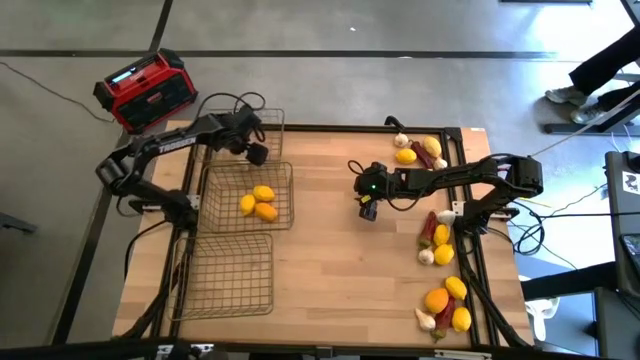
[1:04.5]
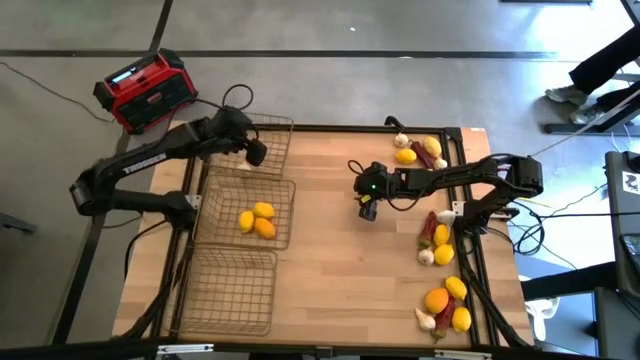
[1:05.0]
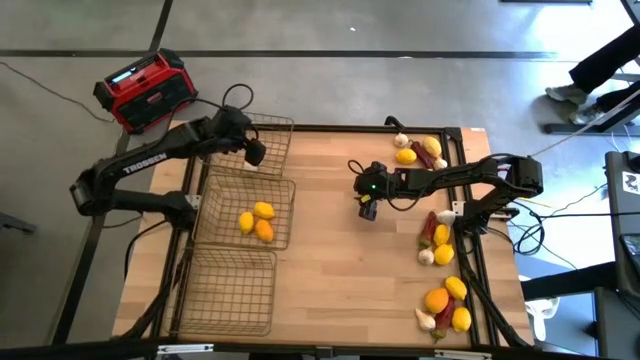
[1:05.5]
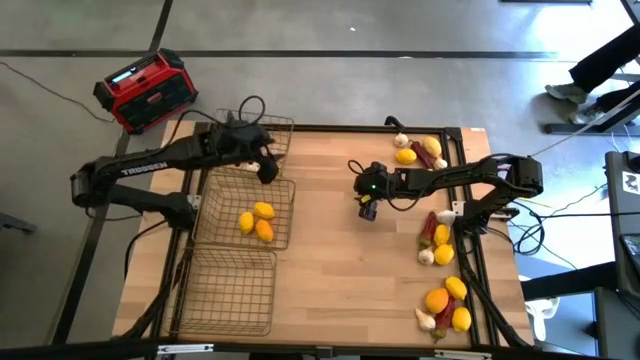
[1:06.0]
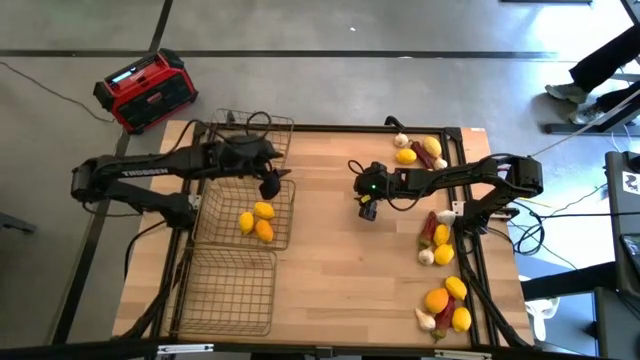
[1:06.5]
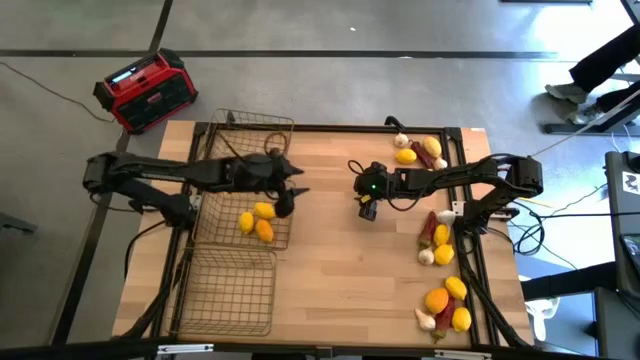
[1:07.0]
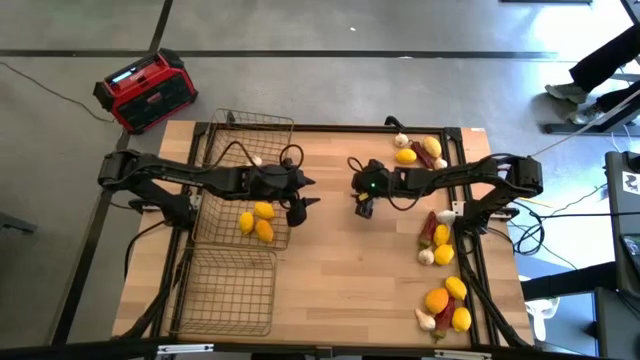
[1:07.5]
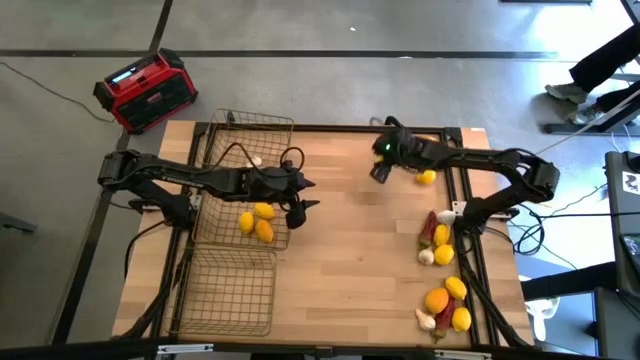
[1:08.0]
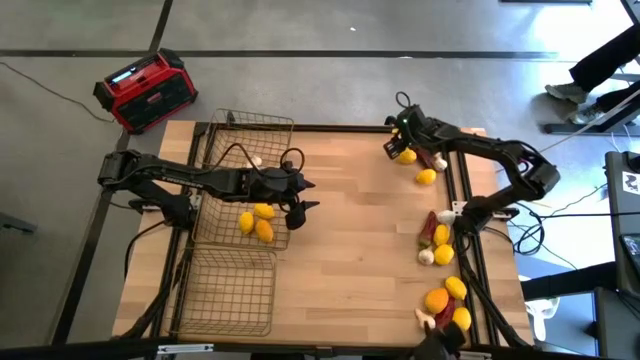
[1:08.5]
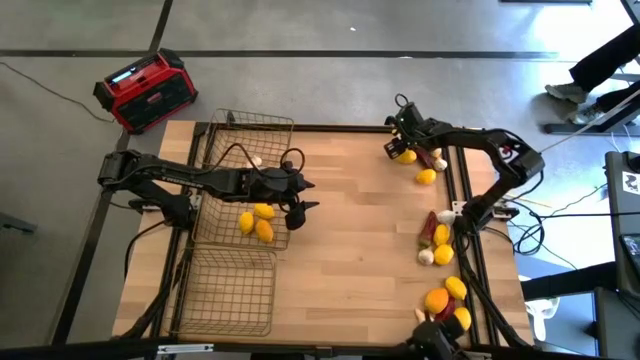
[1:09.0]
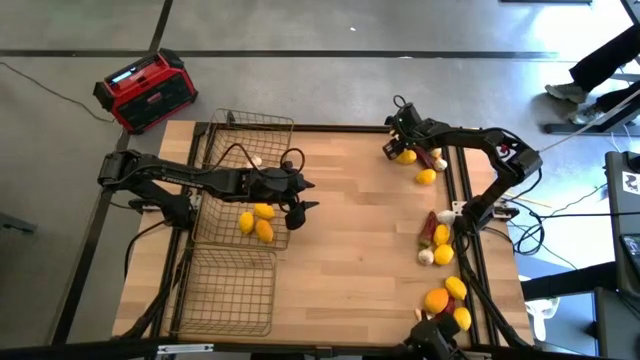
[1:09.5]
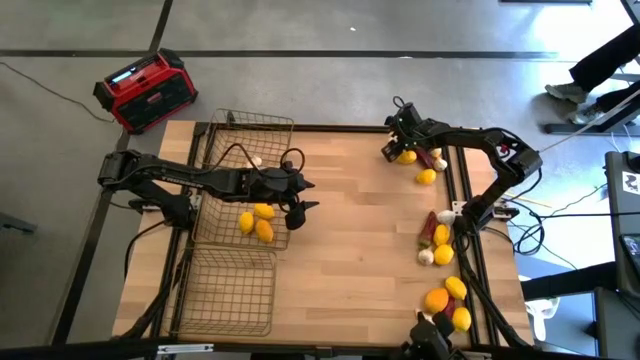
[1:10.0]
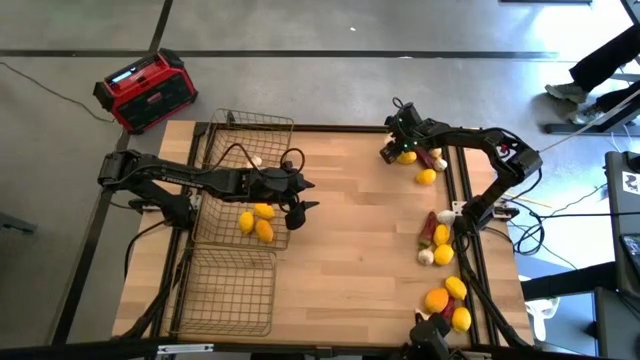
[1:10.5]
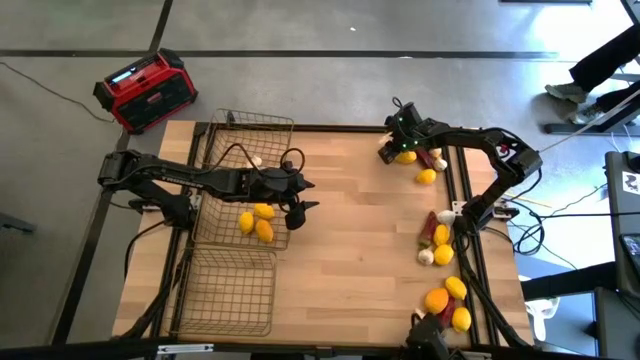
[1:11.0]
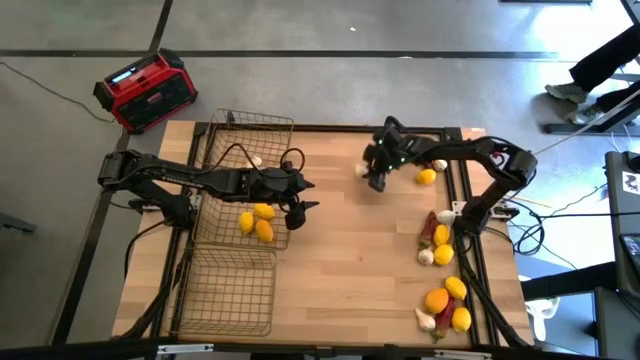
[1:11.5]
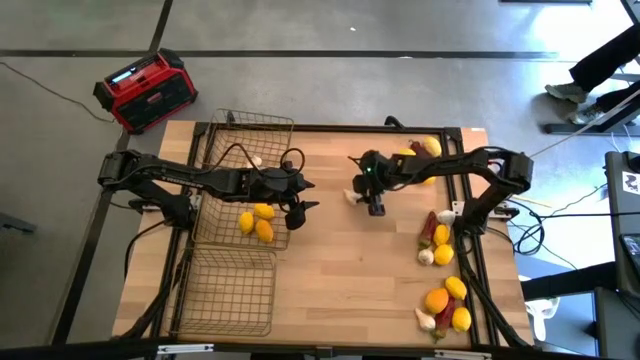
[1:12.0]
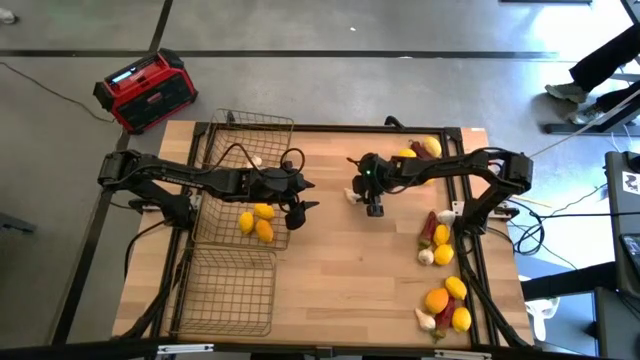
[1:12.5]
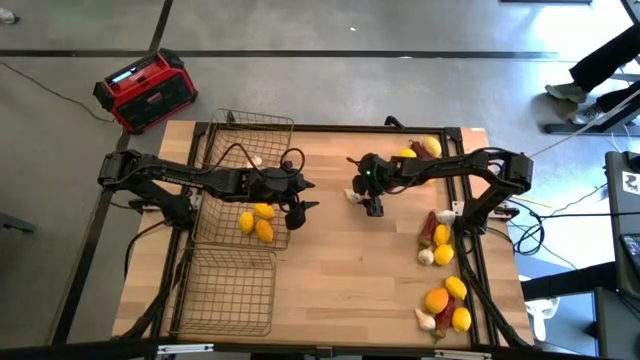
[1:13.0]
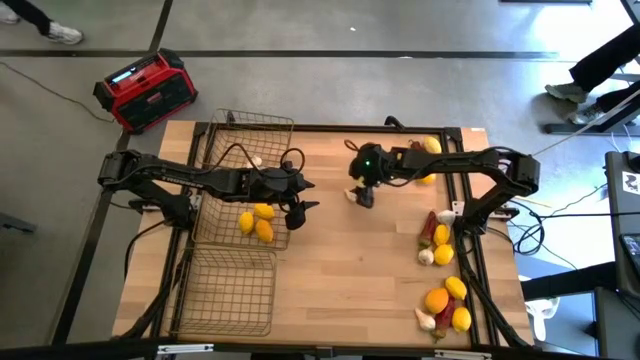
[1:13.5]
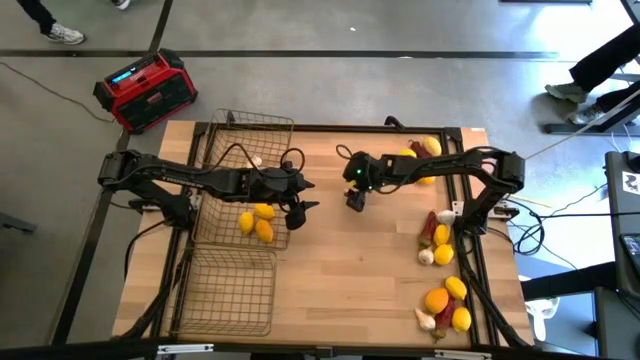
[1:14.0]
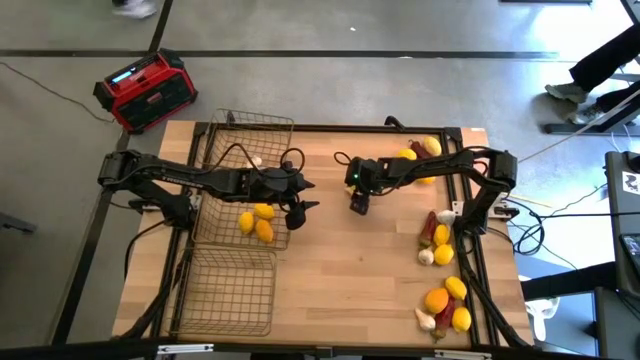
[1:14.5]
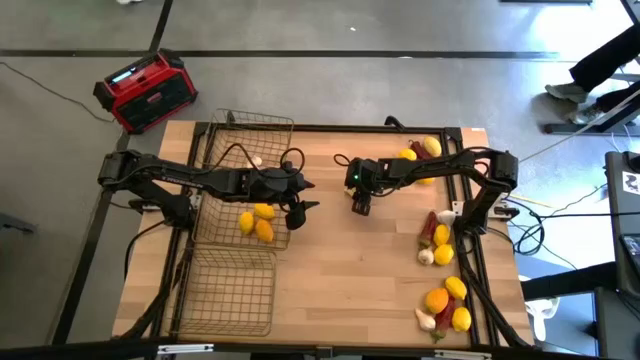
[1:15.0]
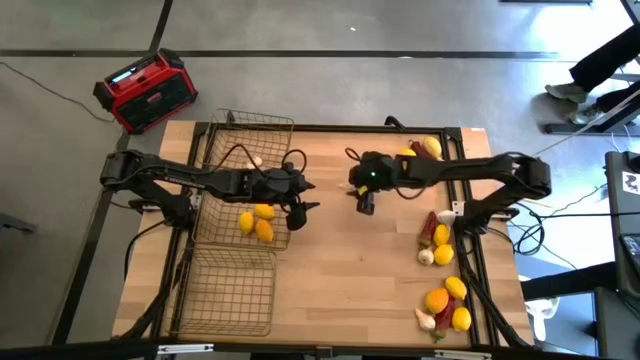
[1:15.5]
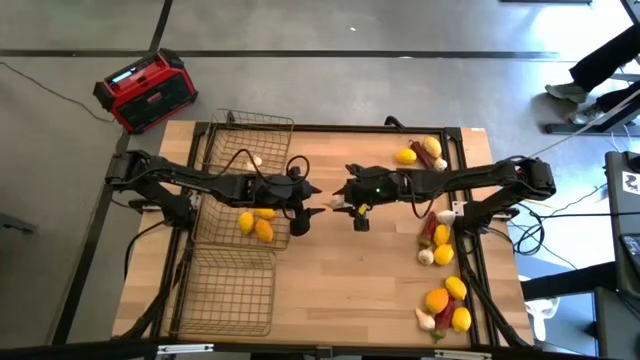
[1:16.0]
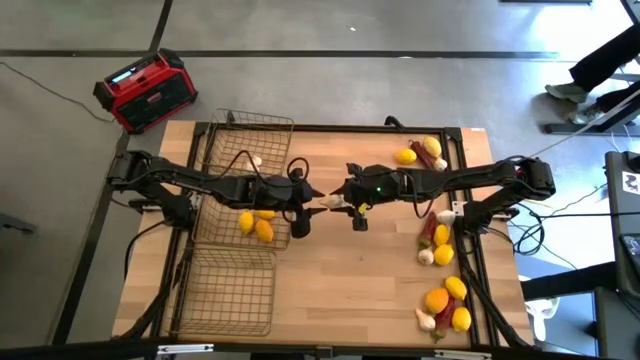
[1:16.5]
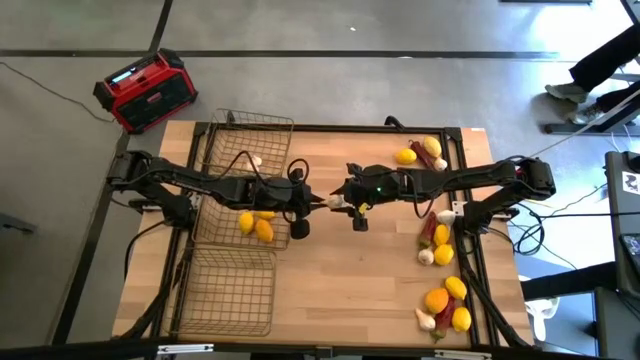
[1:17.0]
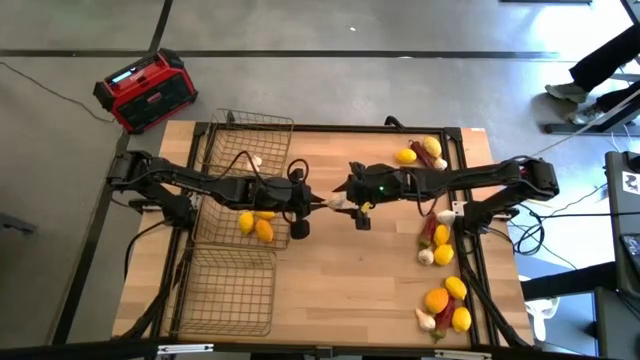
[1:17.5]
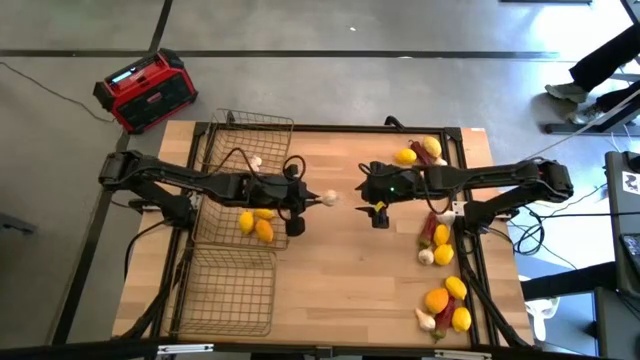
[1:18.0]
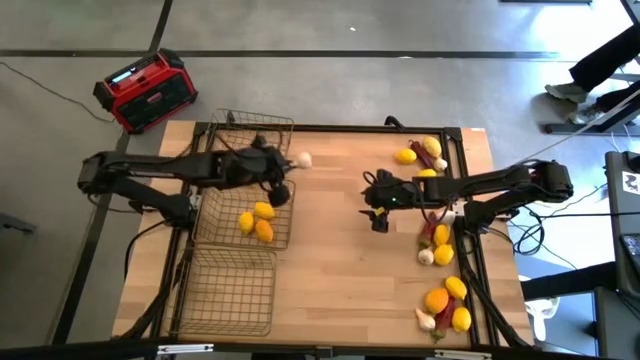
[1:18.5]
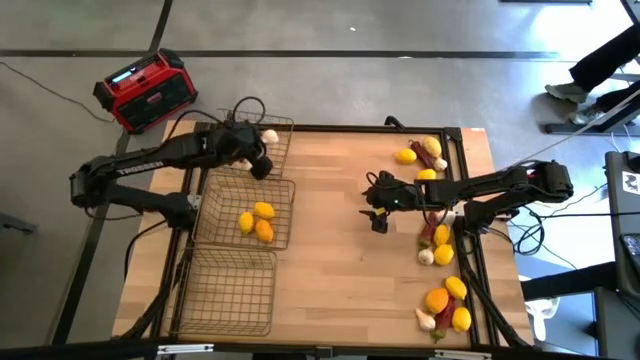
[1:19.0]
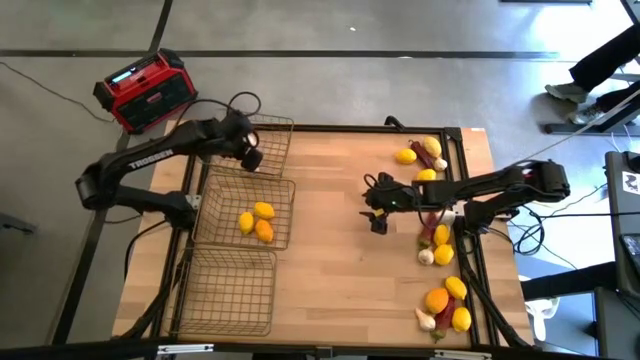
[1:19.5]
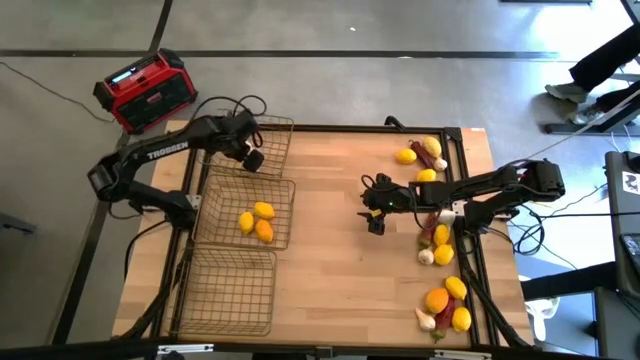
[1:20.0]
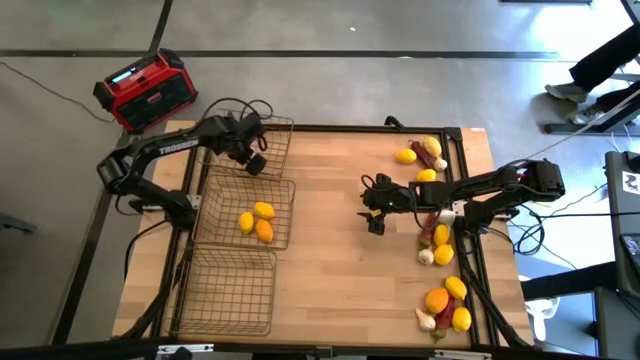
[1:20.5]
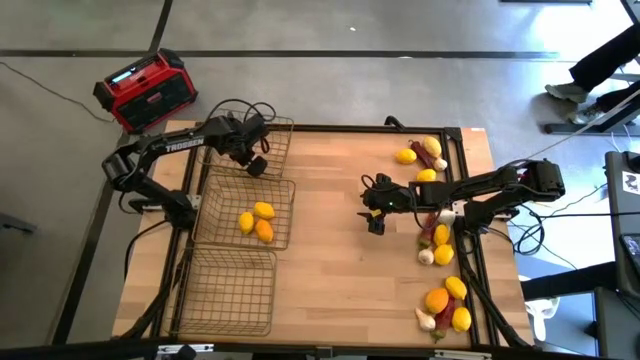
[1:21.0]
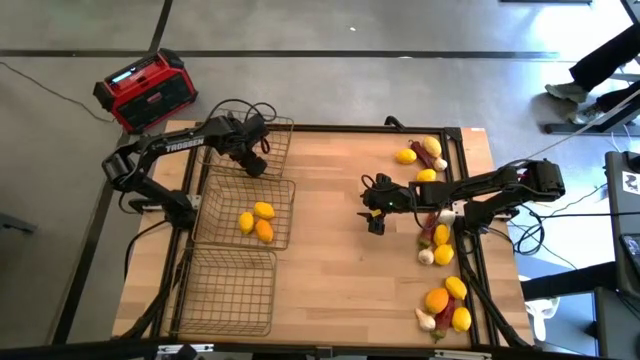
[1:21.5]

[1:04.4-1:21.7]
Task: Sort produce into baskets
Put the garlic in the top wire basket

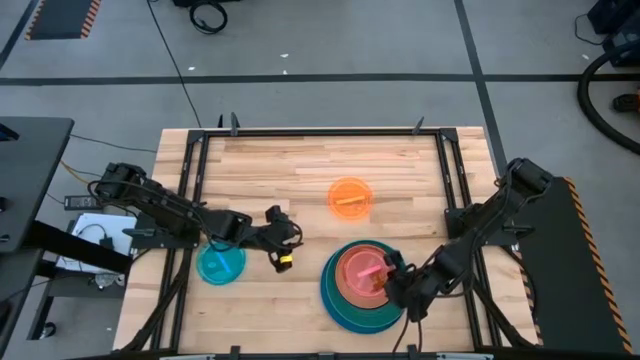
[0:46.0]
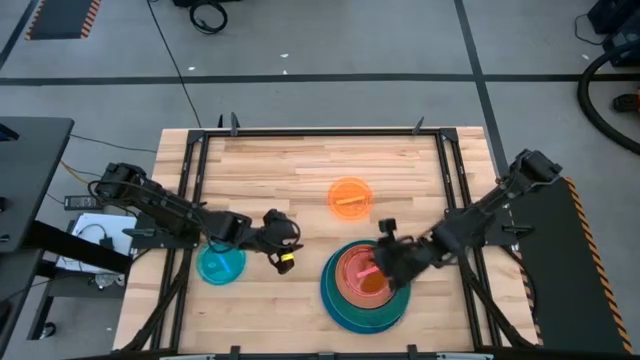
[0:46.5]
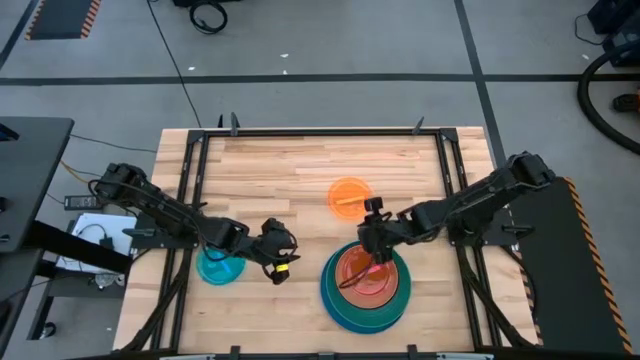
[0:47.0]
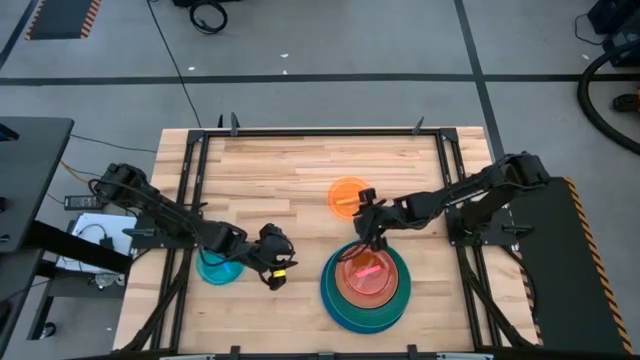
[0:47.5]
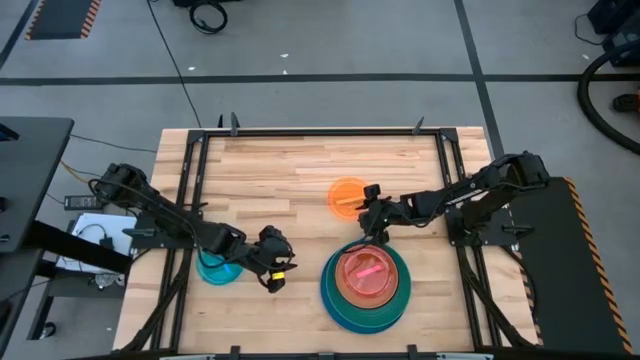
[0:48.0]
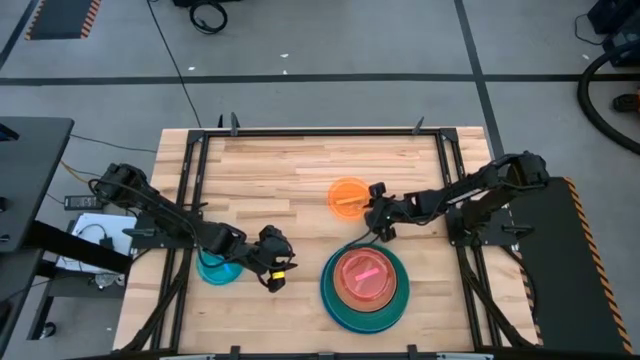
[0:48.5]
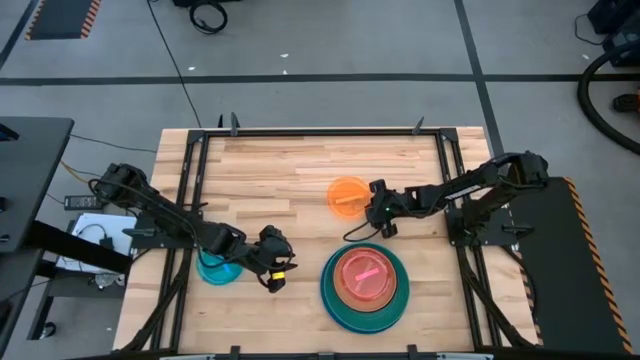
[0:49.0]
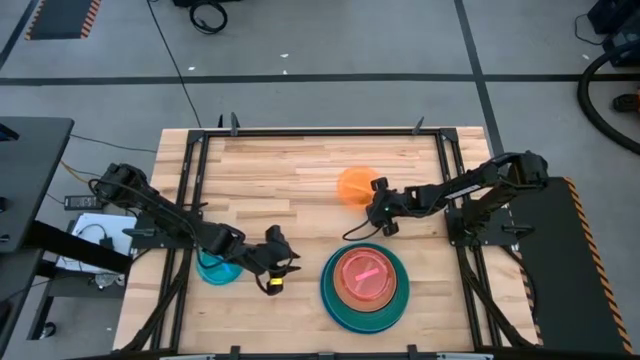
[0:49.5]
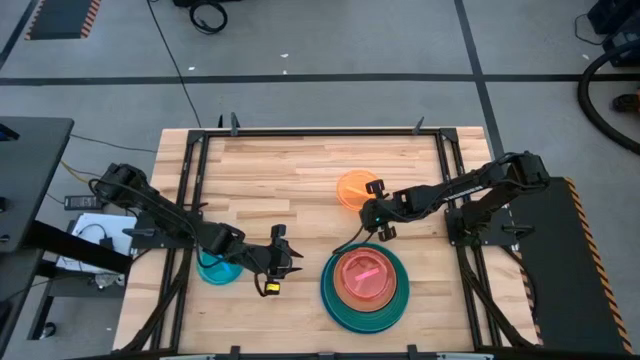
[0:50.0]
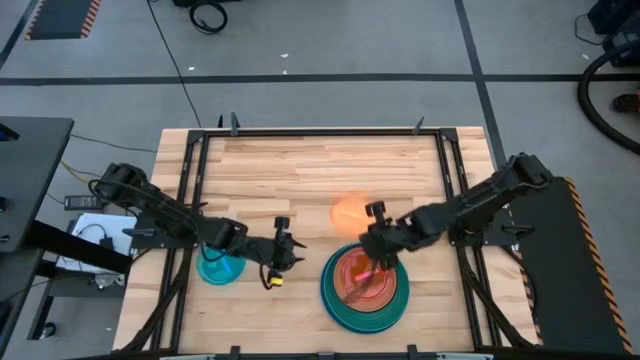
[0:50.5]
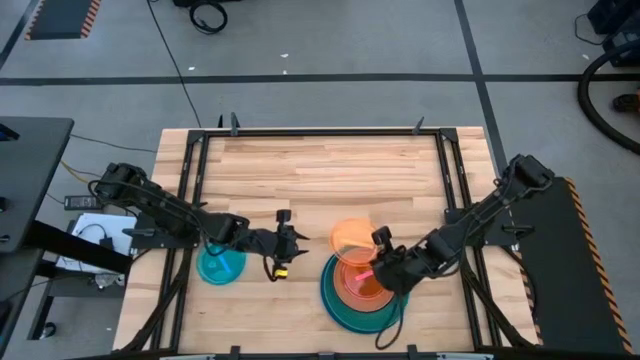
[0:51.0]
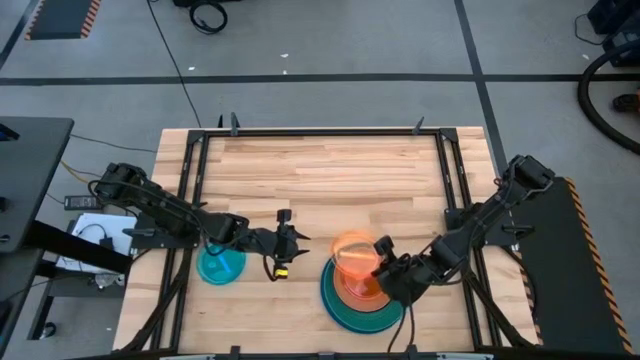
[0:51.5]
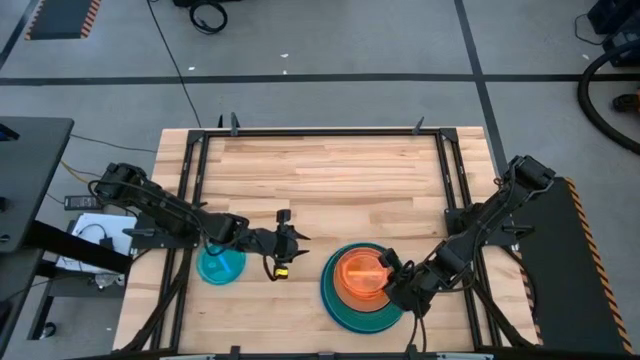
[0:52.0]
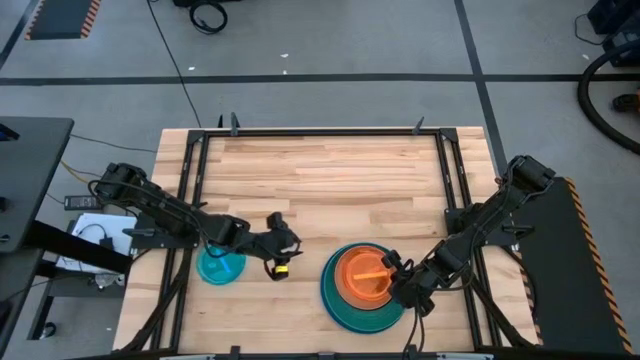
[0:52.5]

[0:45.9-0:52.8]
Task: Stack plastic plates
Stack the transparent orange plate on the top of the transparent pink plate
